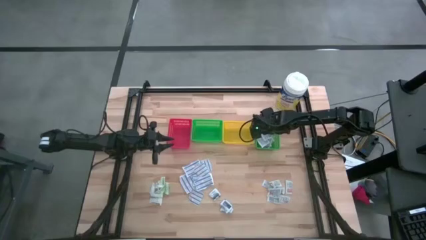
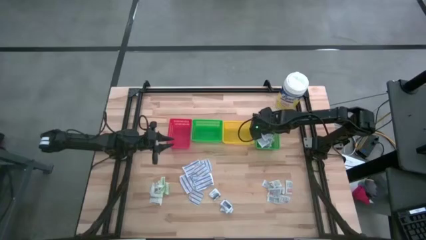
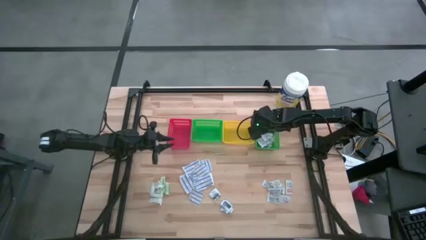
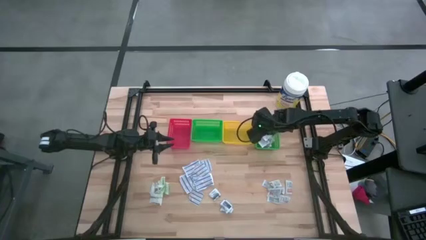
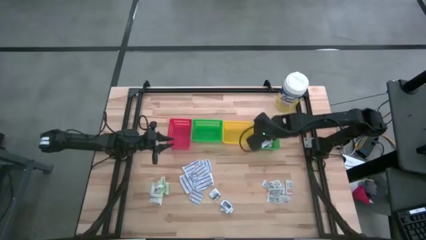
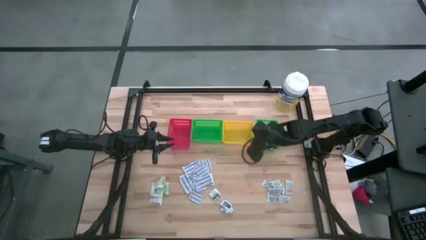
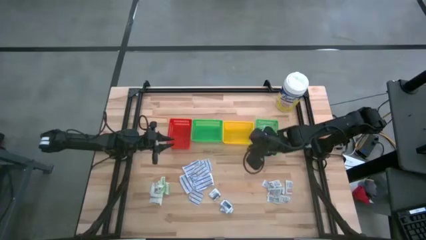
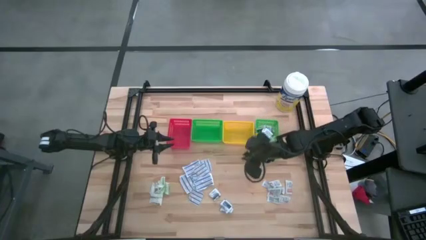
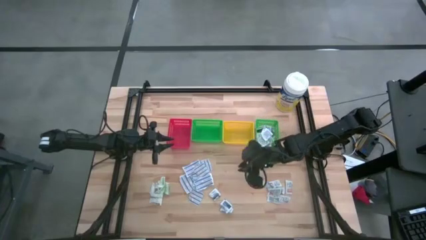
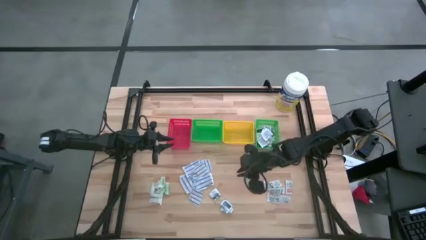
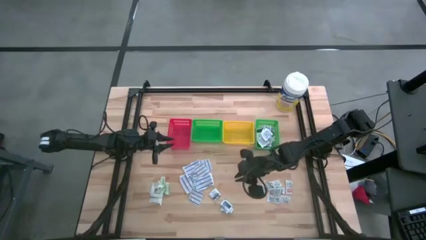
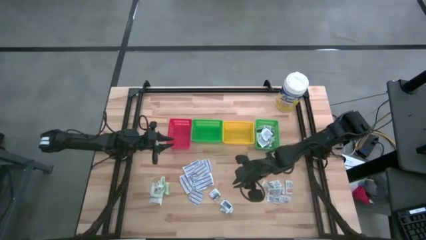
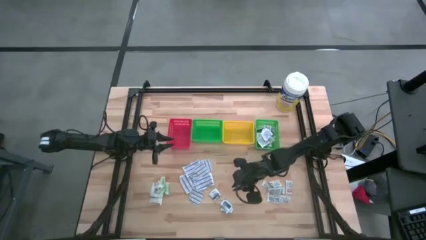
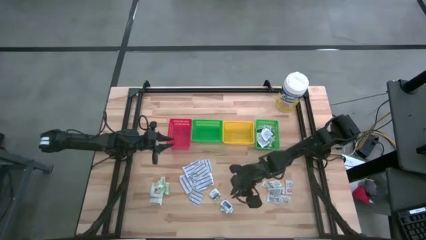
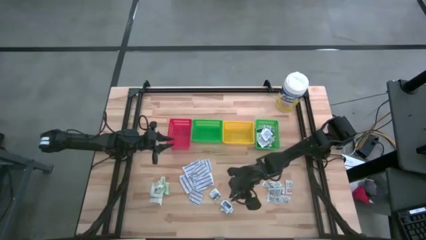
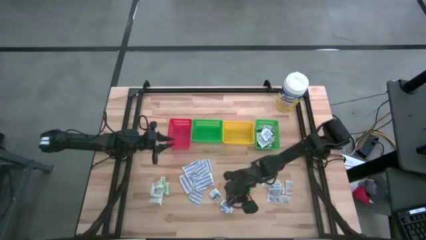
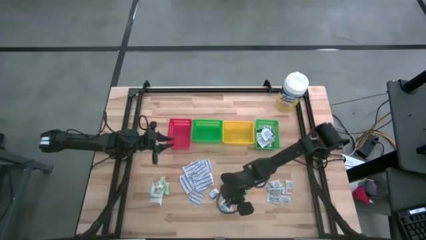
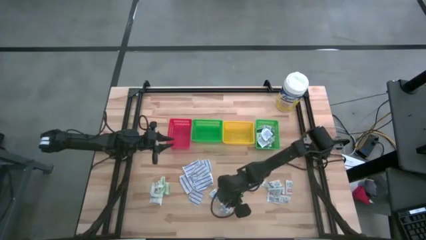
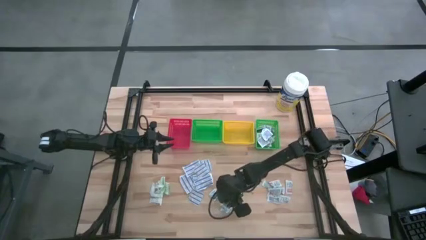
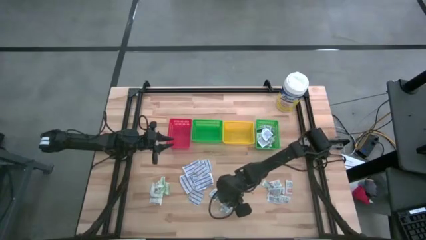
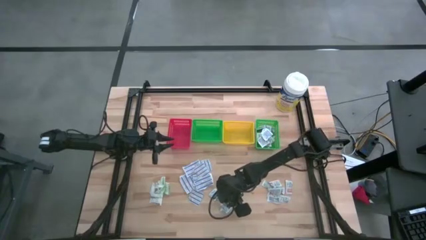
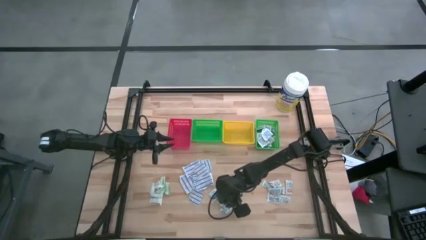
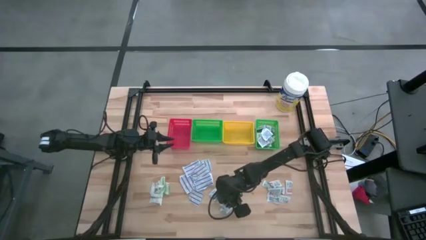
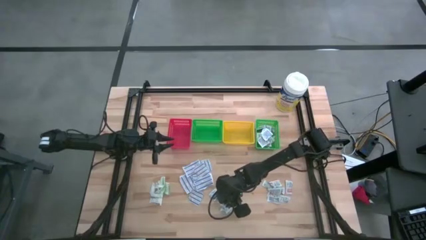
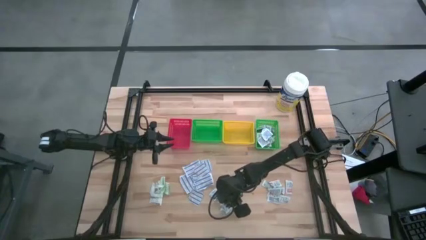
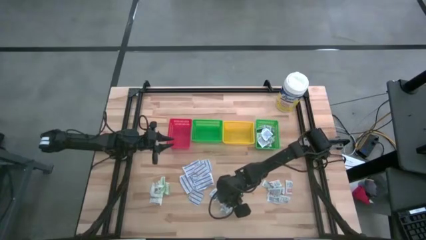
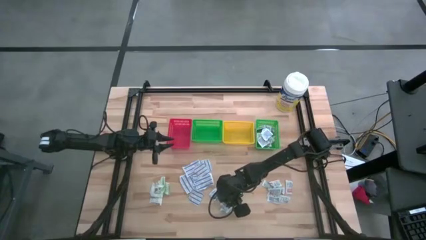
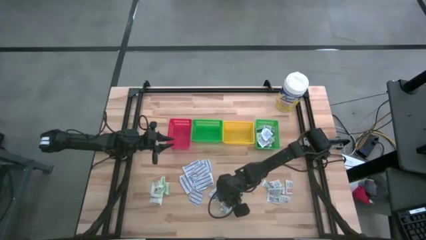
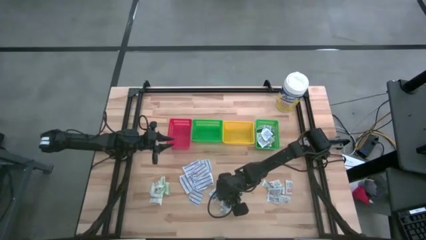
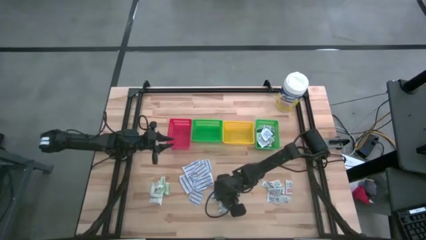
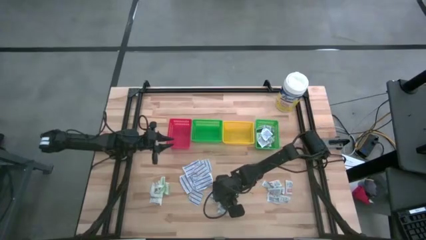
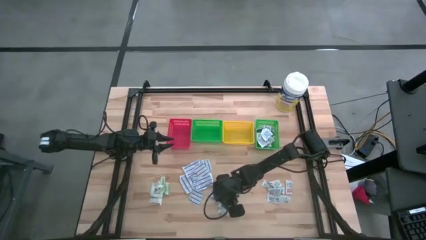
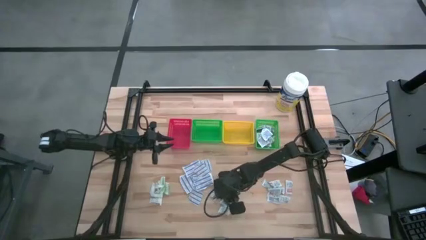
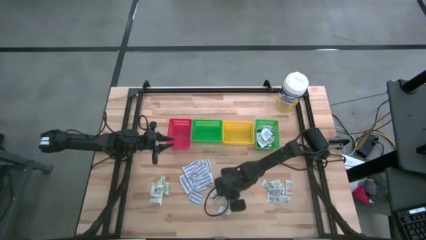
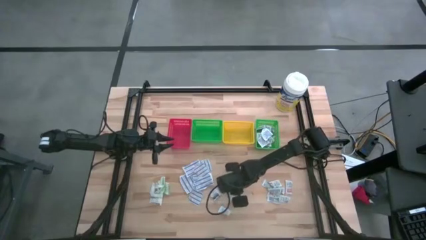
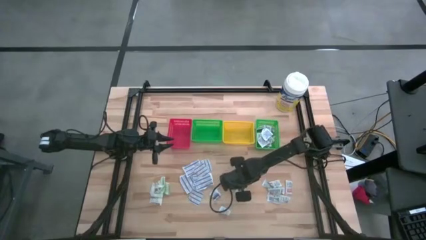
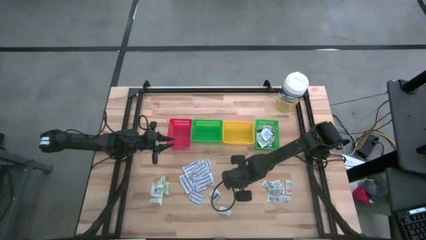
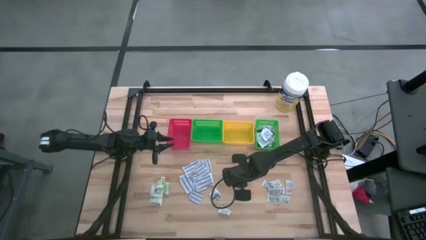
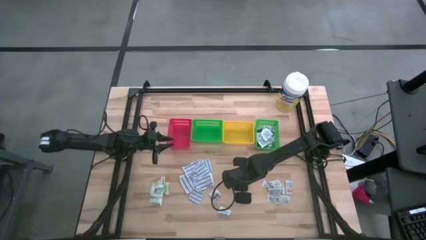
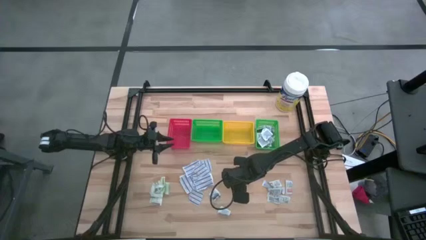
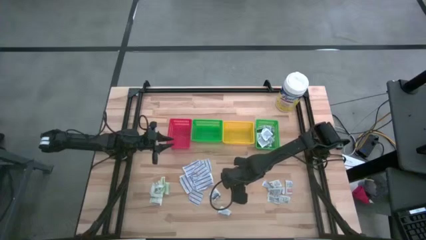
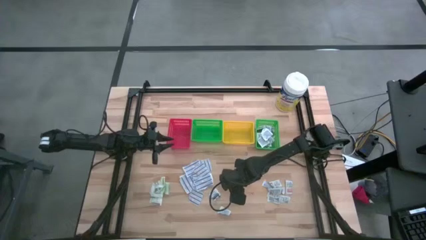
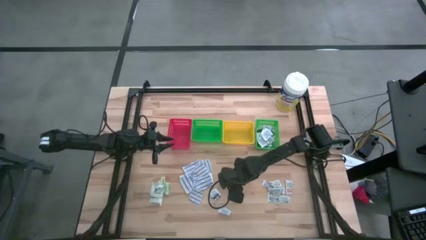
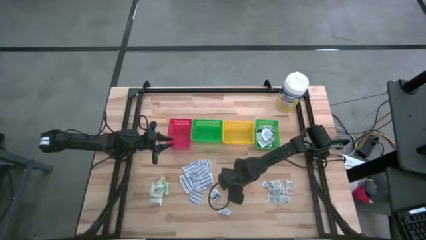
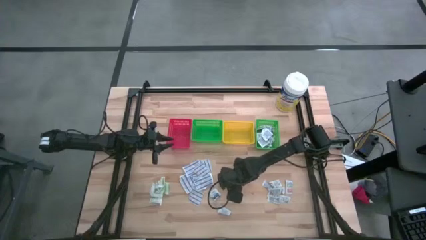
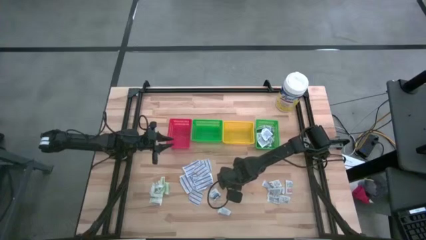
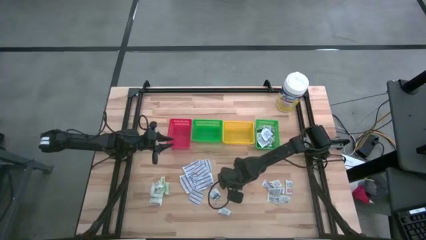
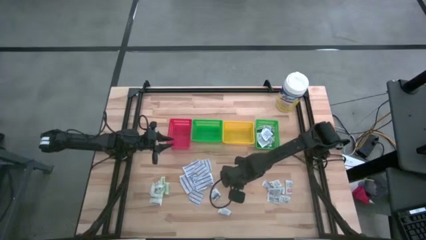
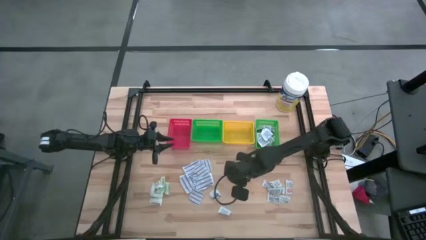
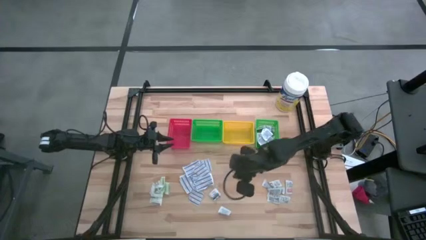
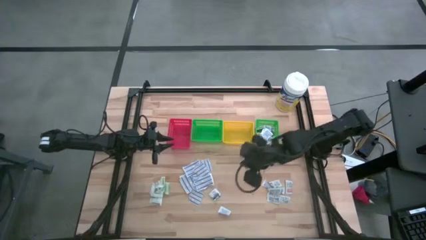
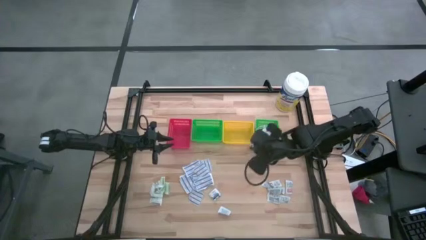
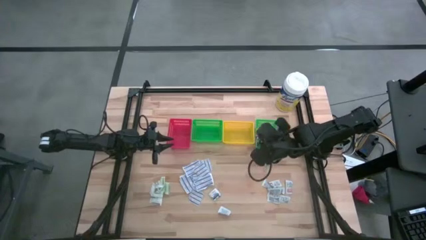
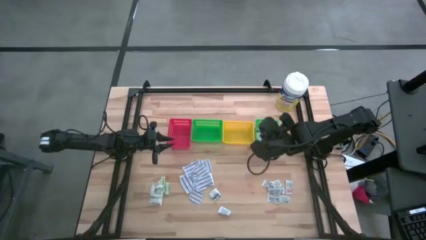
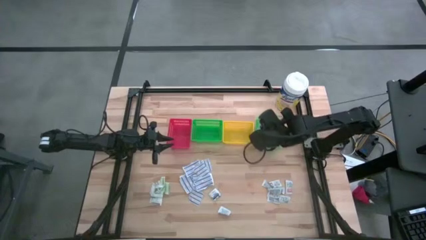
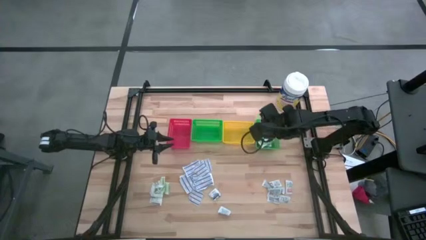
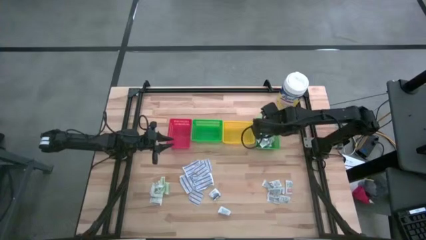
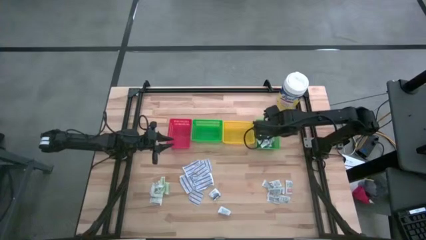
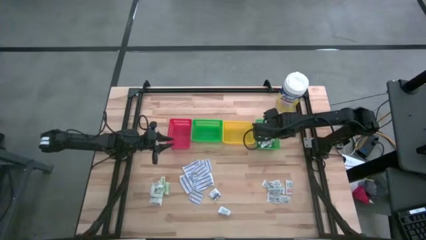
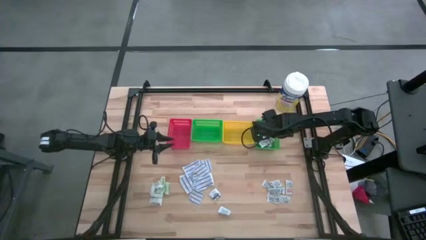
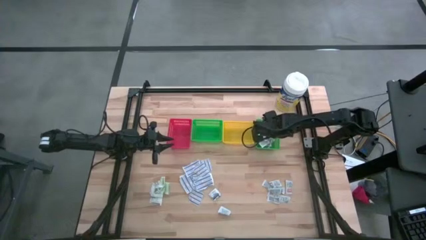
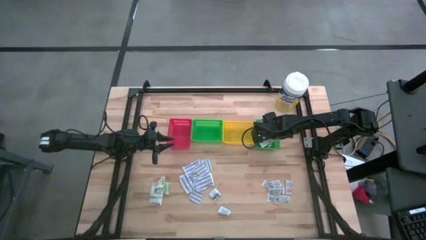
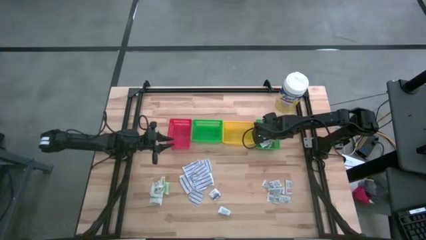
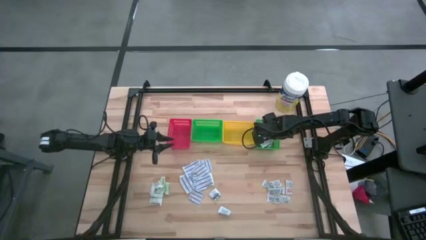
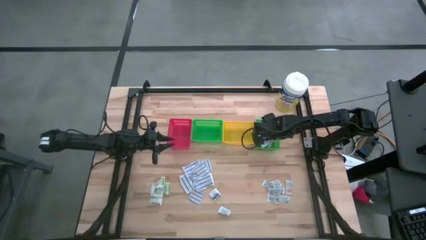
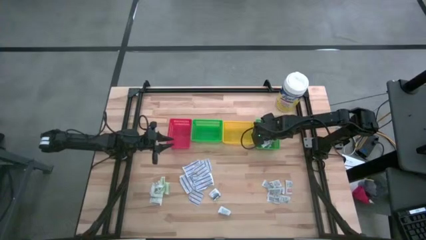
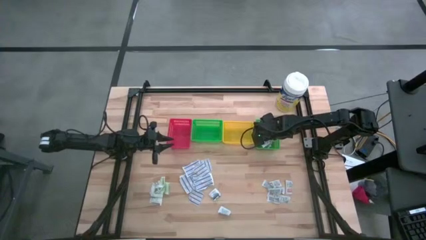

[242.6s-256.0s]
Task: Pick & Place First Aid Supplies
Put the blue alcohol pad into the right green bin

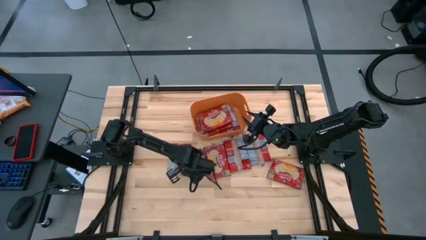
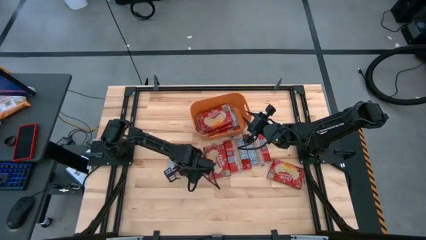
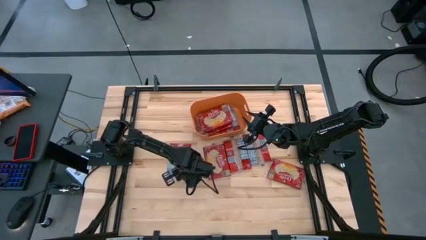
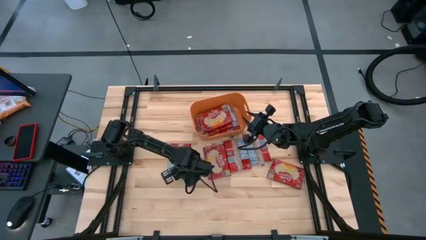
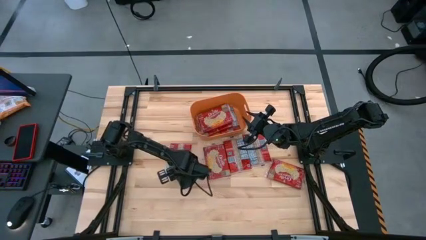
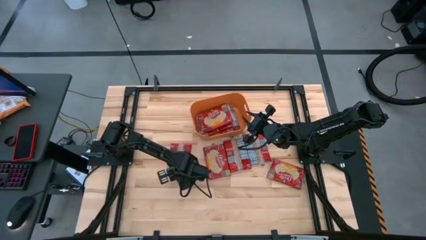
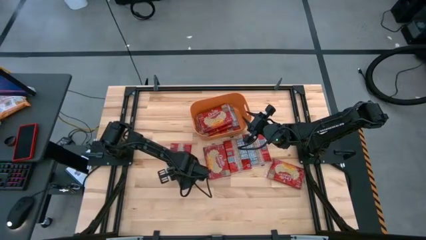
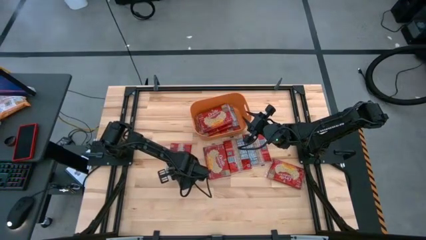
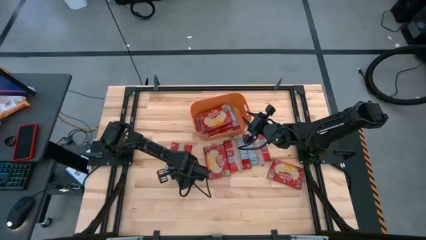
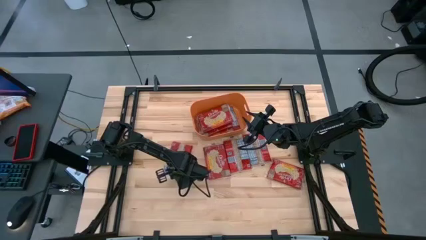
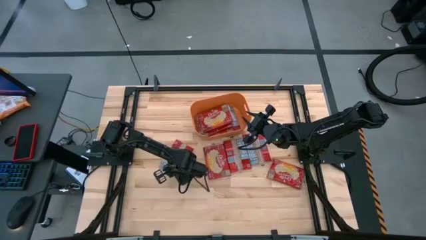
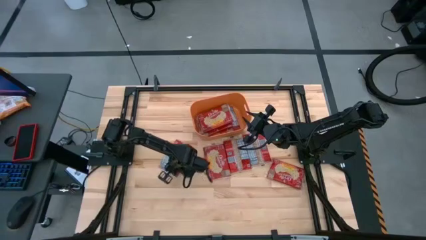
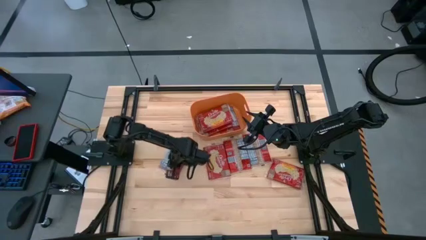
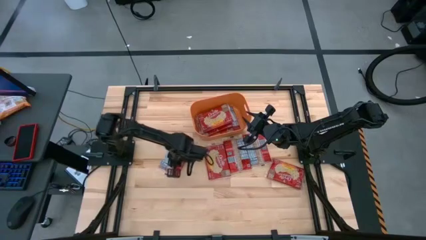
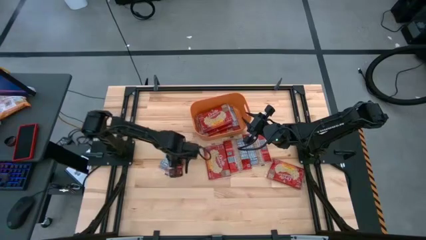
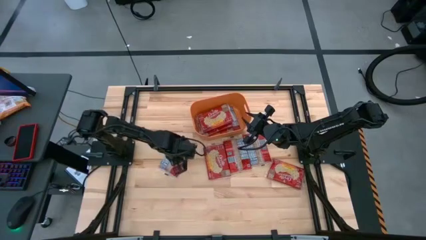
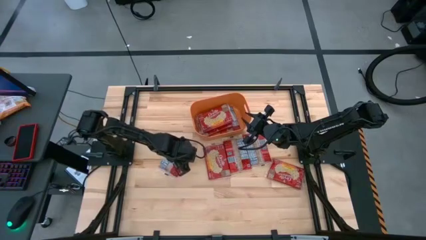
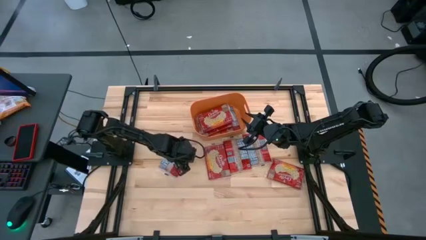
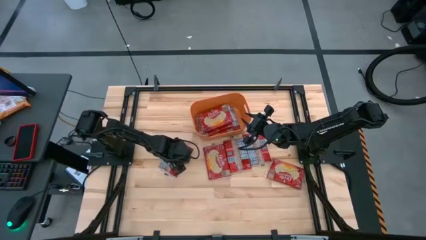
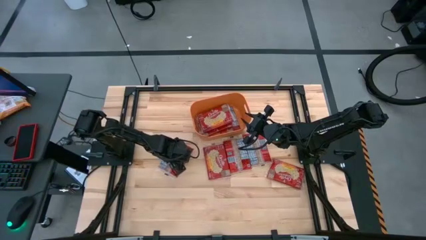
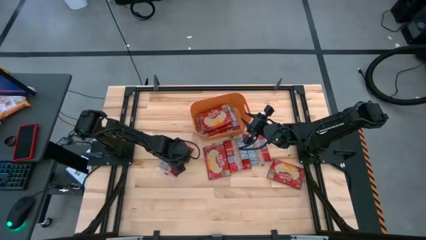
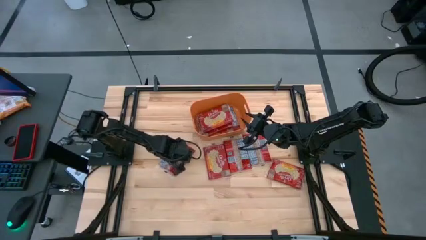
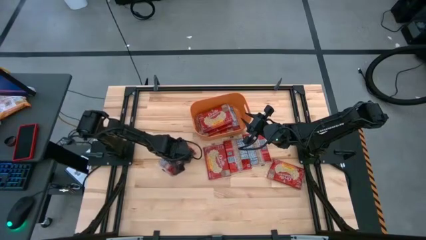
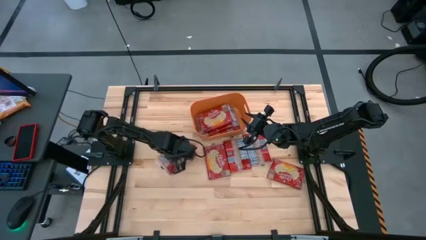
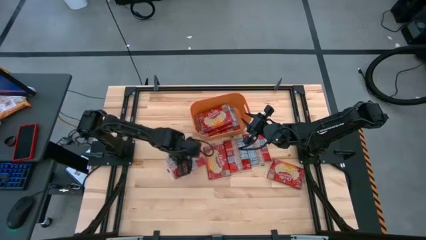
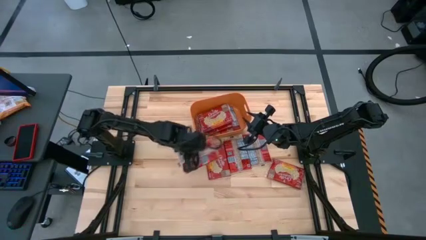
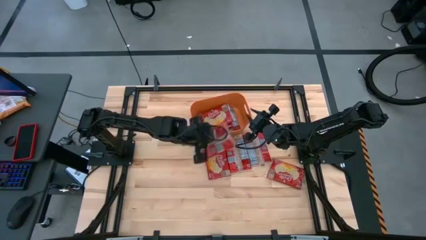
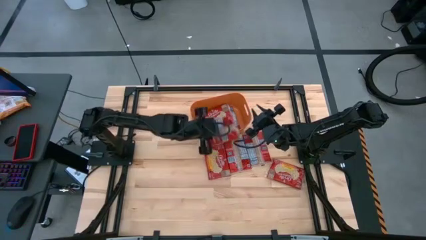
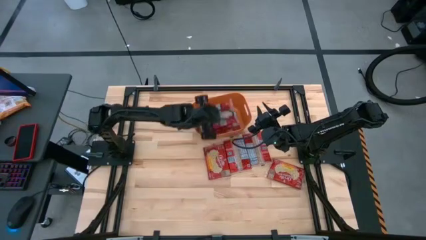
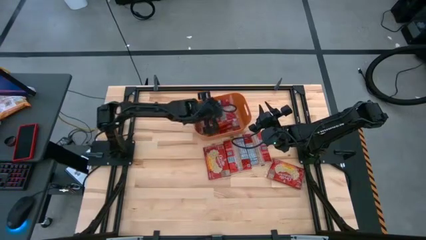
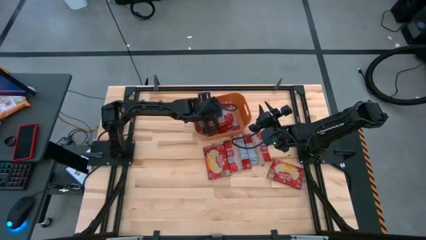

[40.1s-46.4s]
Task: Sort popcorn bags into baskets
Put the red popcorn bag into the orange bin
